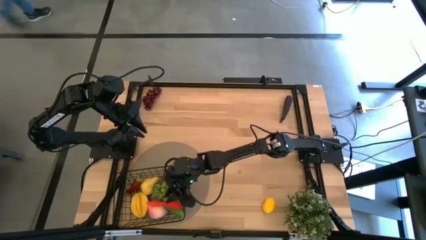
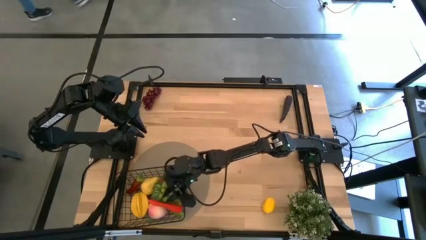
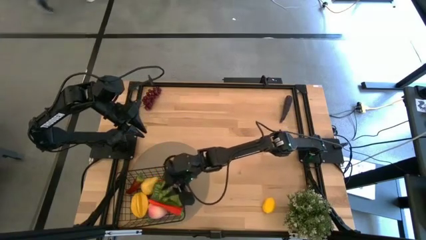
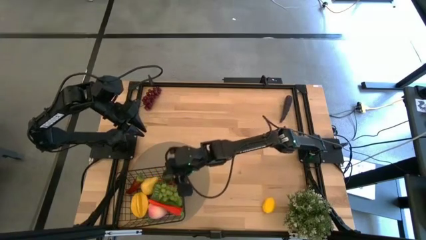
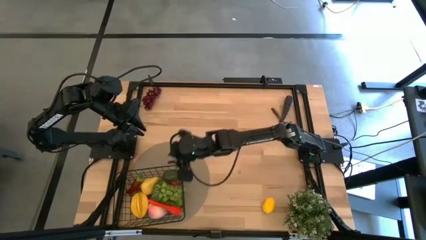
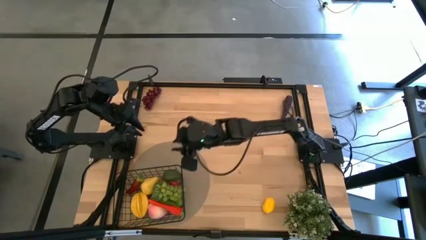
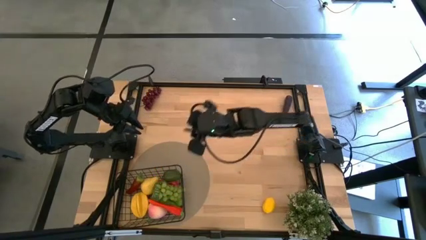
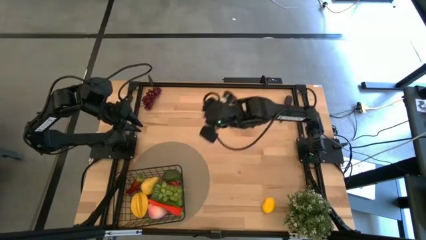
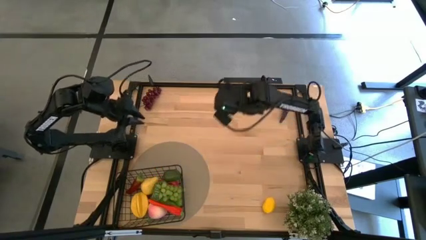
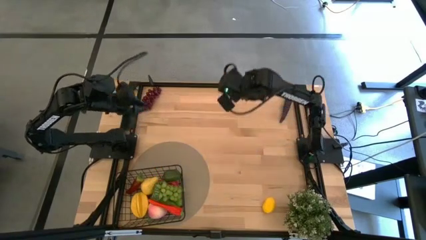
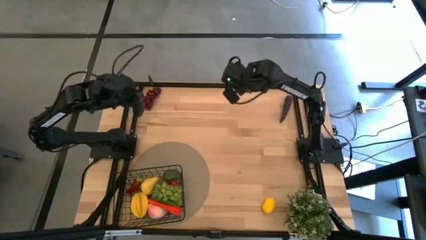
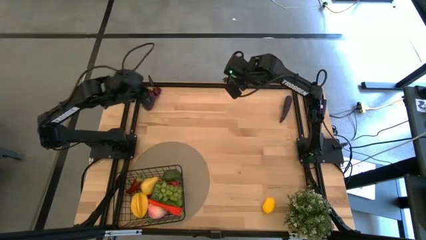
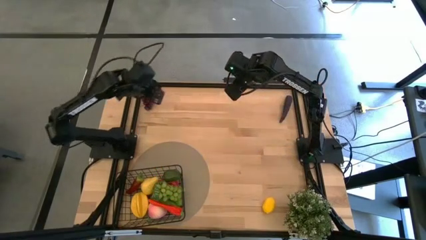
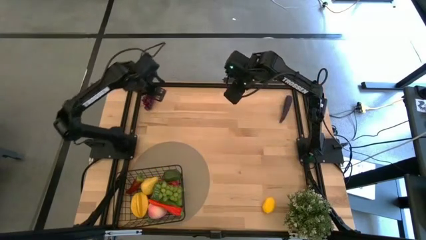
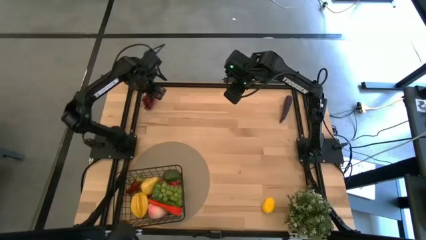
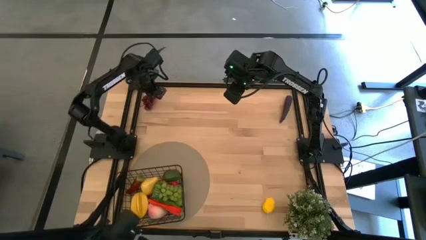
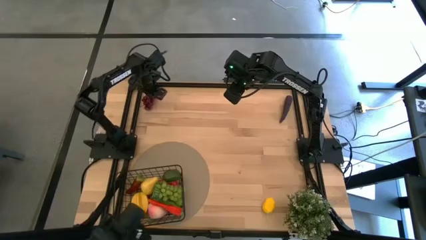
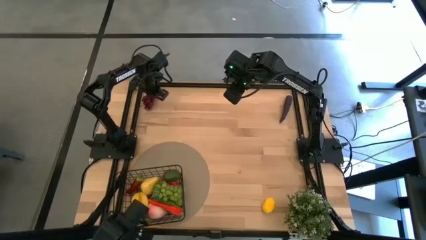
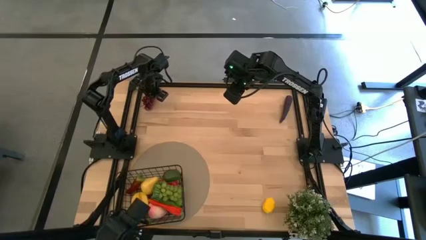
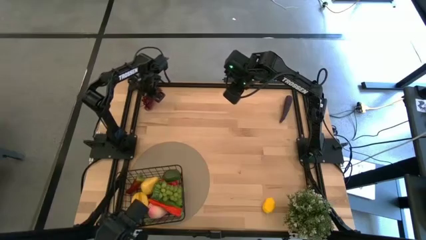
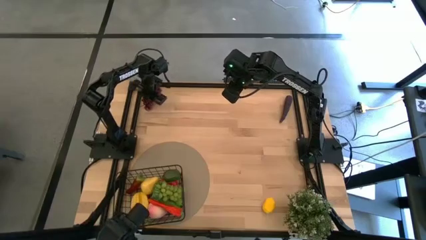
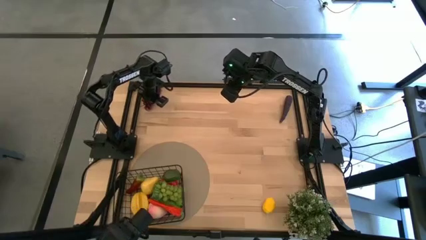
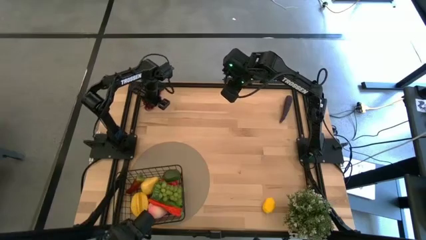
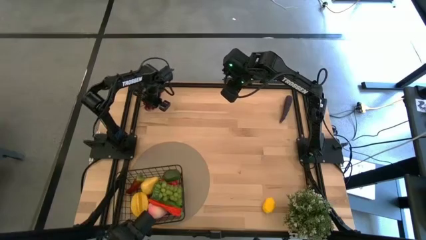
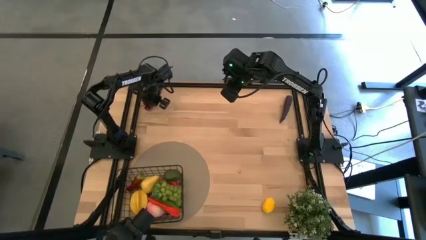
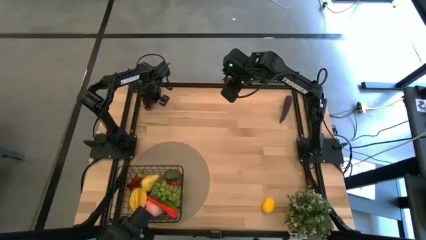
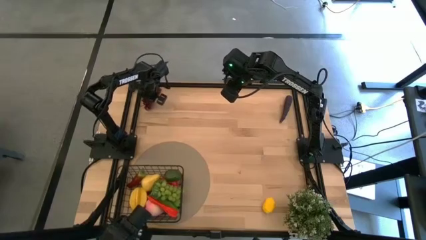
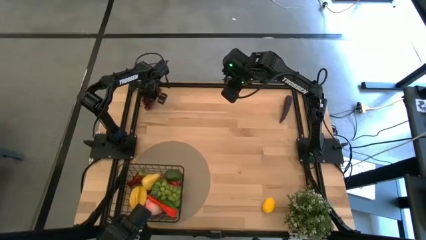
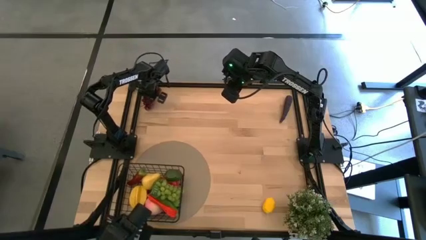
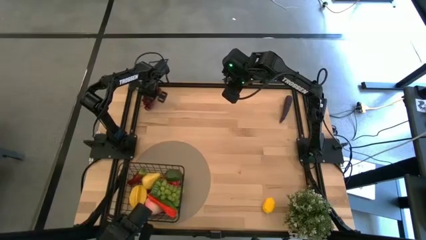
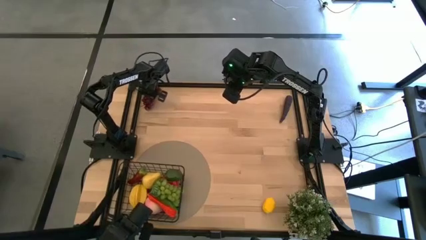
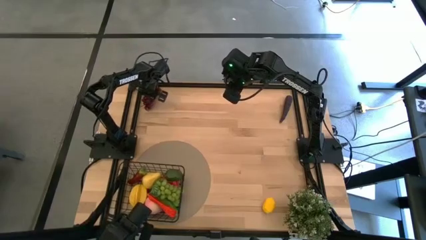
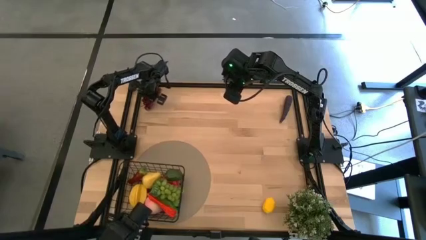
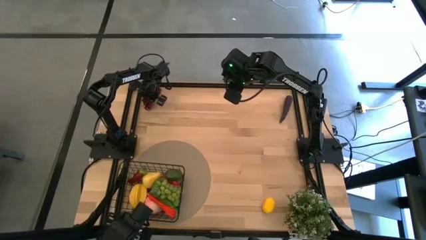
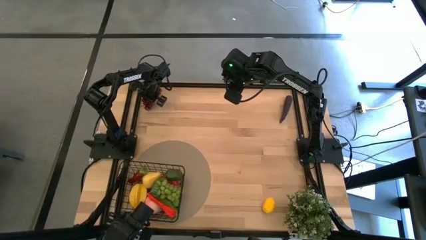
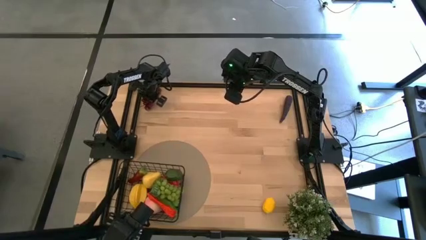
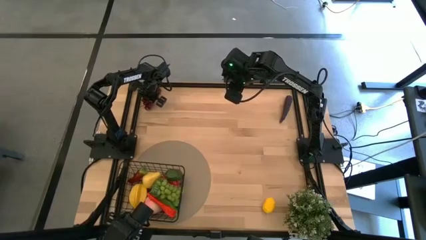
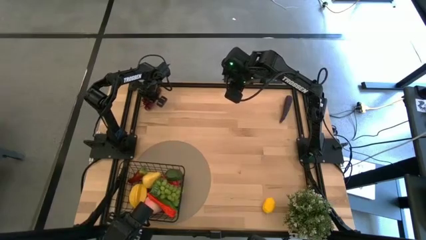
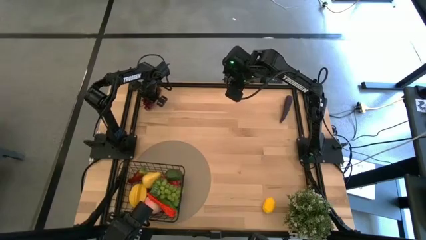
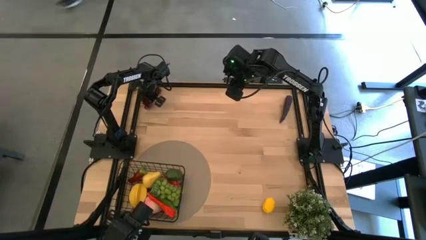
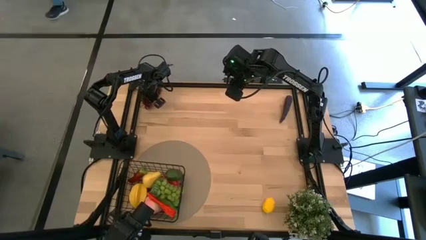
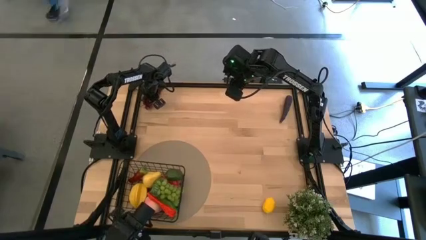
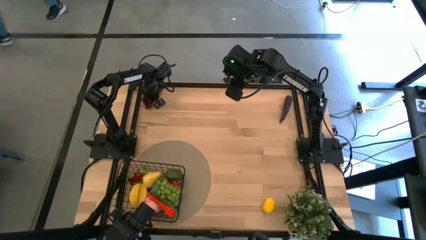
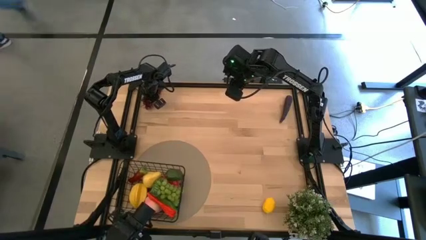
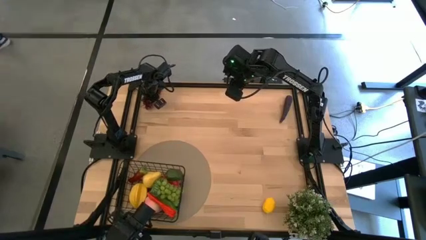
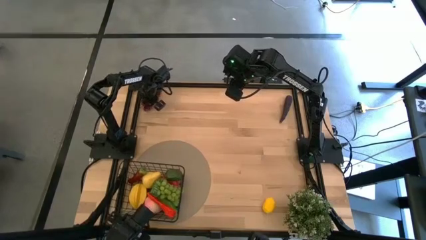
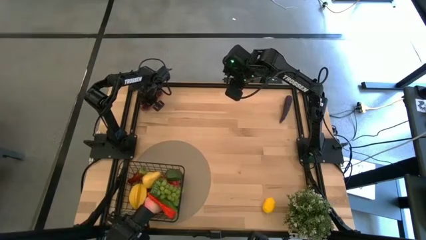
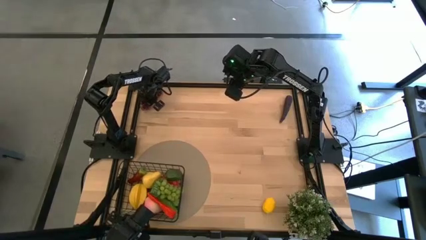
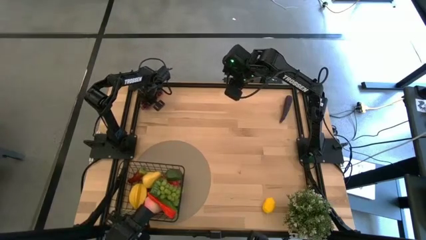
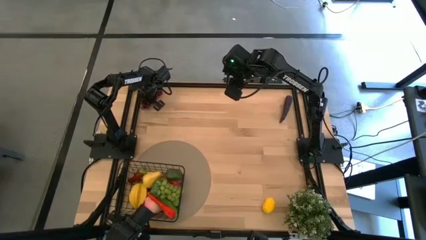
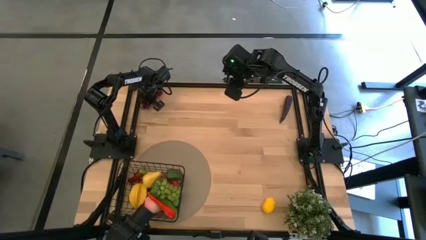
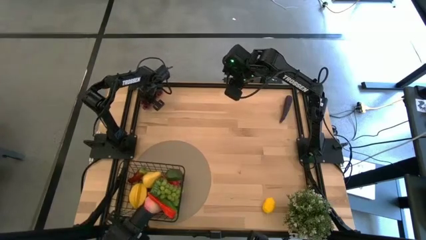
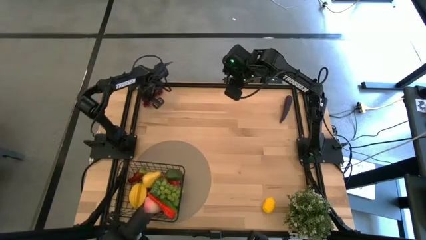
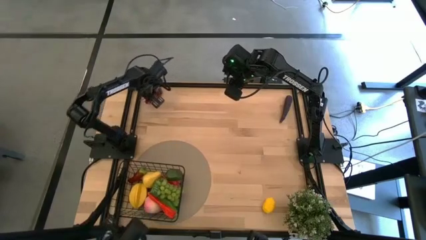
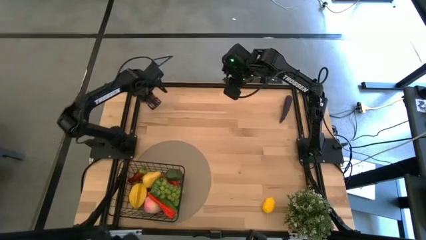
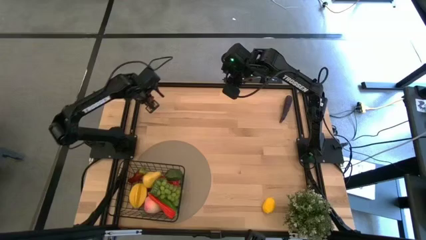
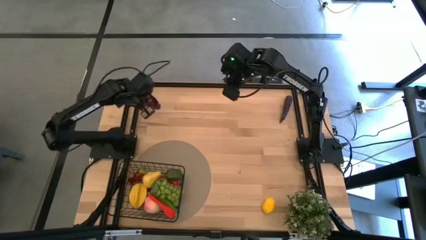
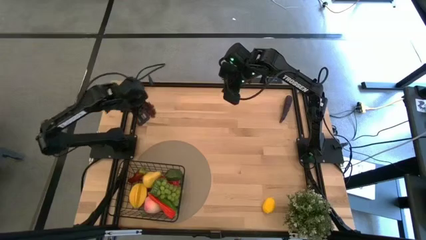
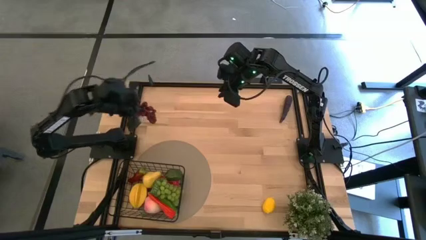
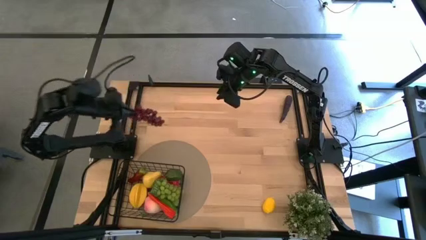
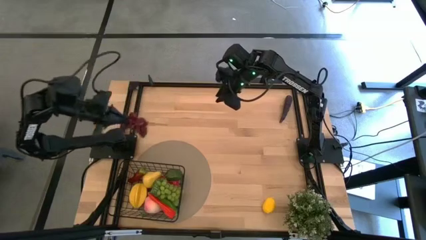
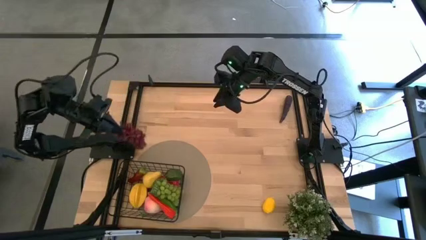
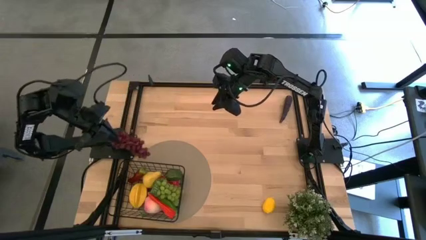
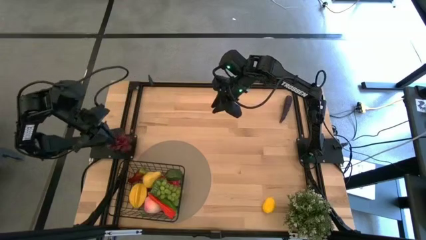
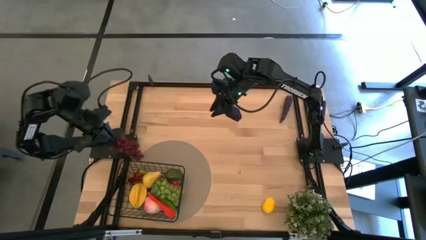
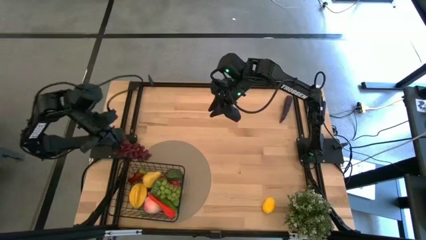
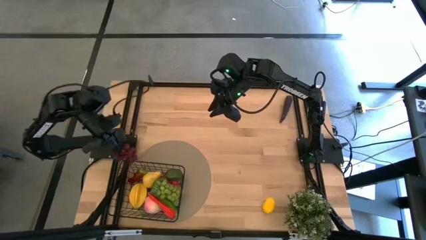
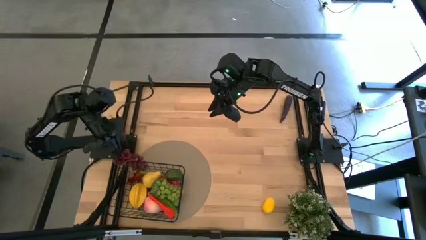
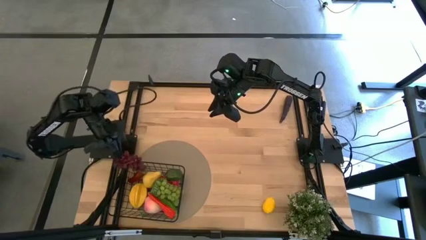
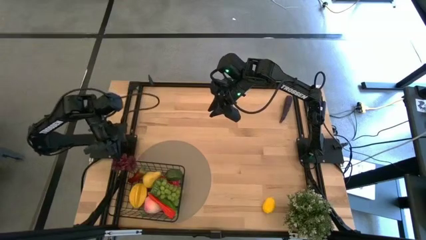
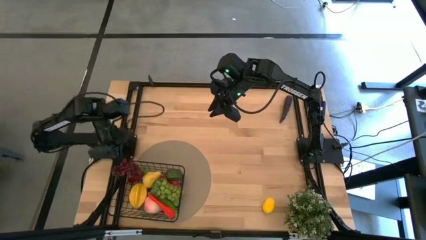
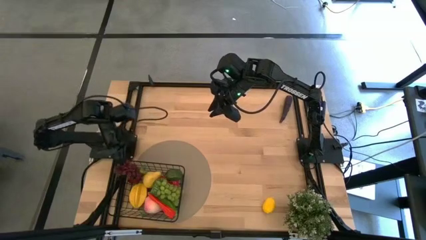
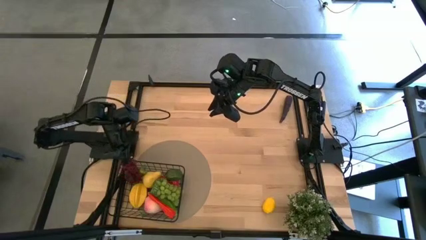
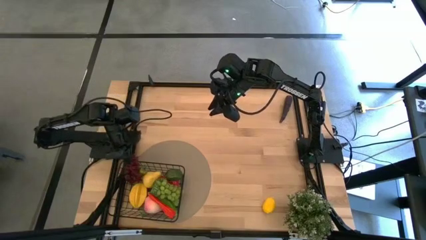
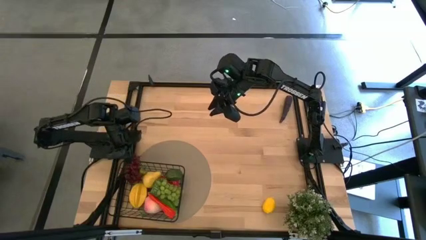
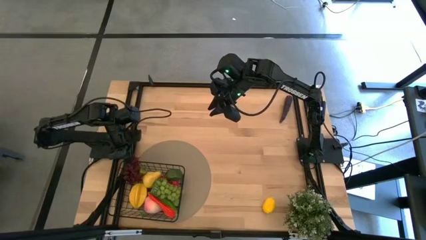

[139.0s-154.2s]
Task: Build produce basket
Put the red grapes into the wire basket
